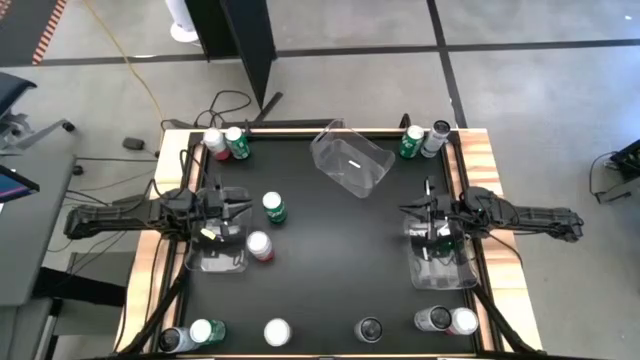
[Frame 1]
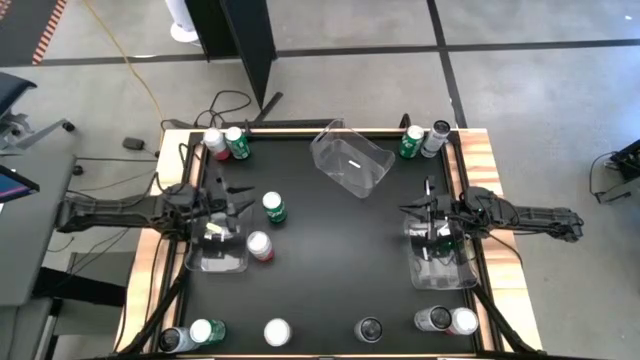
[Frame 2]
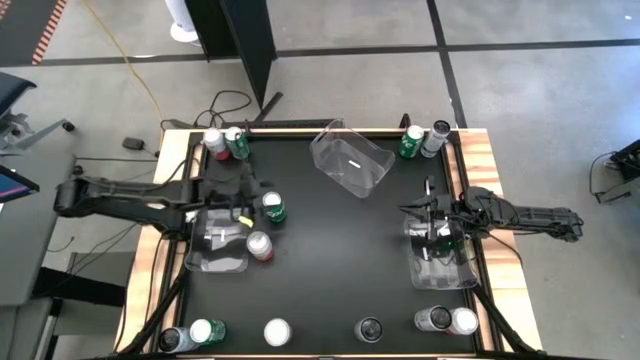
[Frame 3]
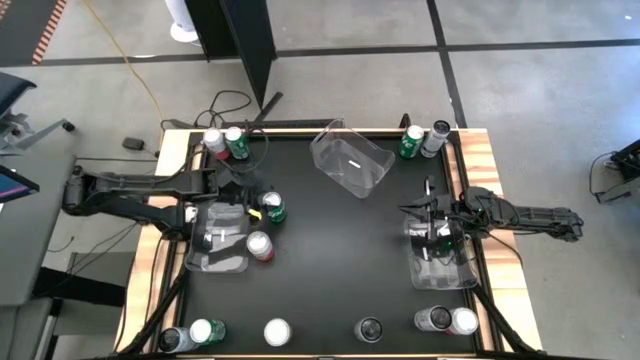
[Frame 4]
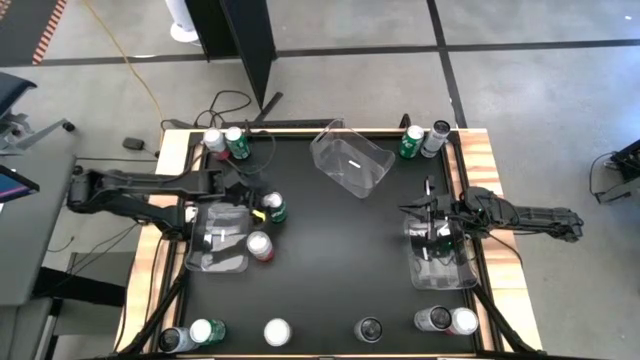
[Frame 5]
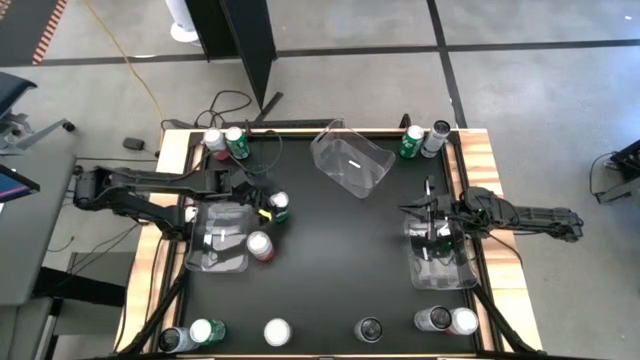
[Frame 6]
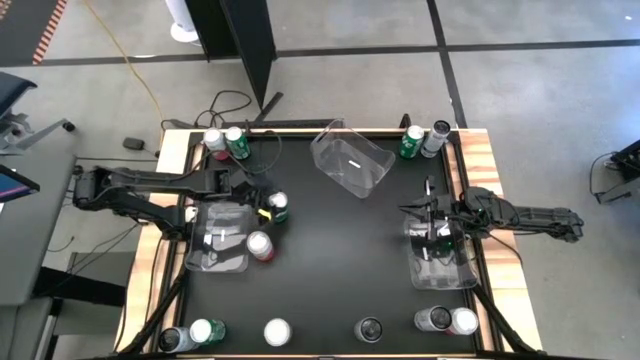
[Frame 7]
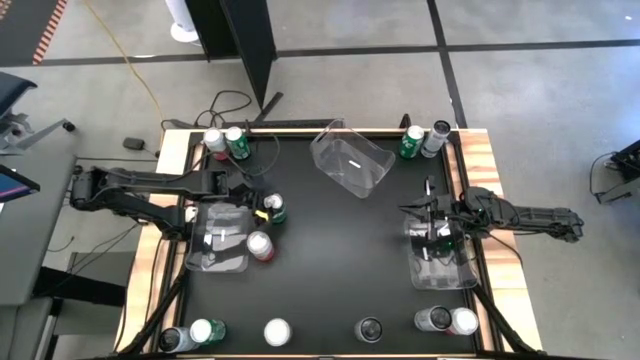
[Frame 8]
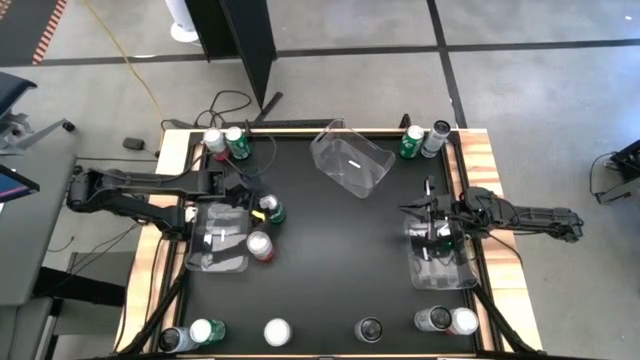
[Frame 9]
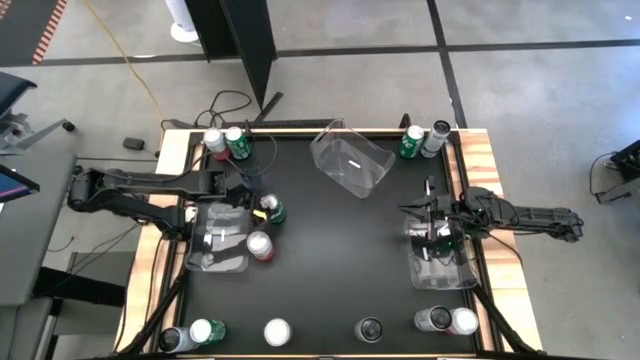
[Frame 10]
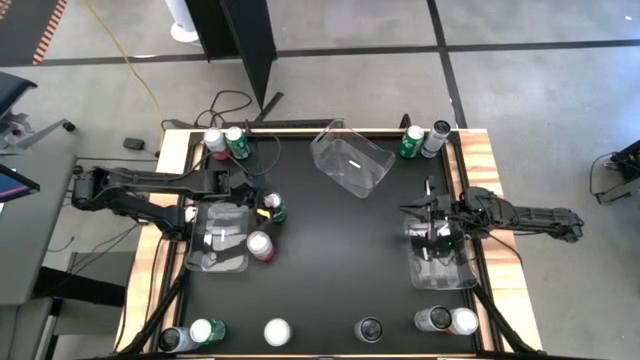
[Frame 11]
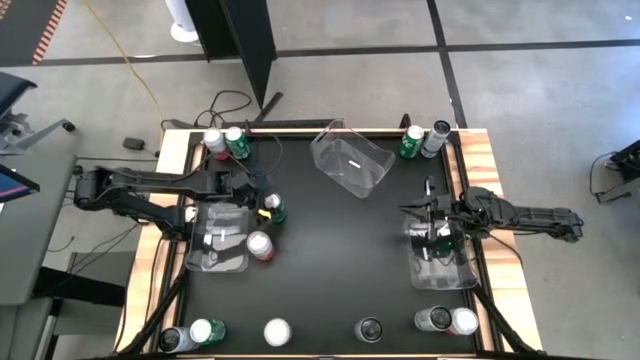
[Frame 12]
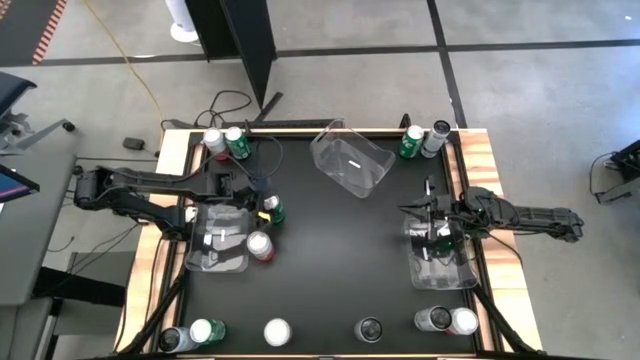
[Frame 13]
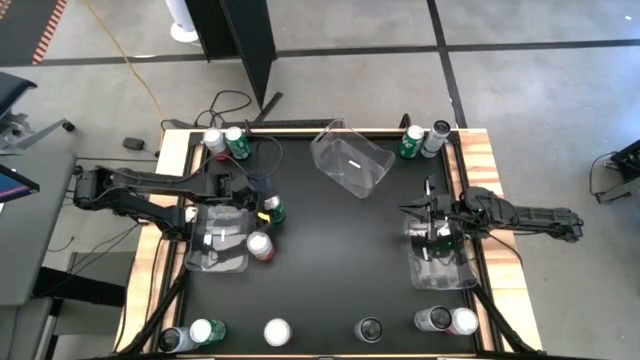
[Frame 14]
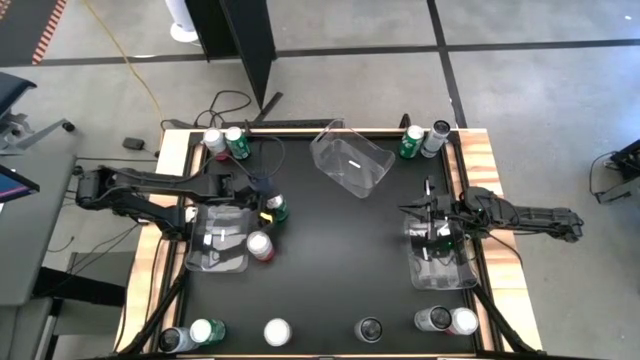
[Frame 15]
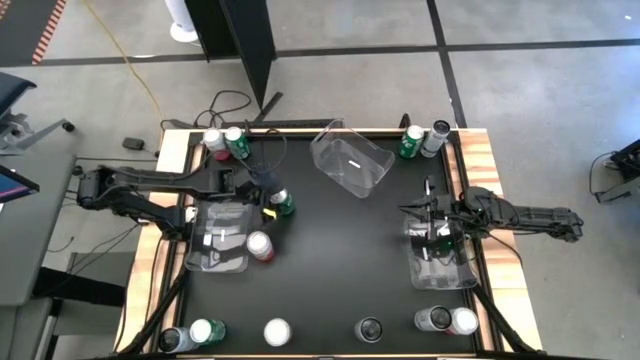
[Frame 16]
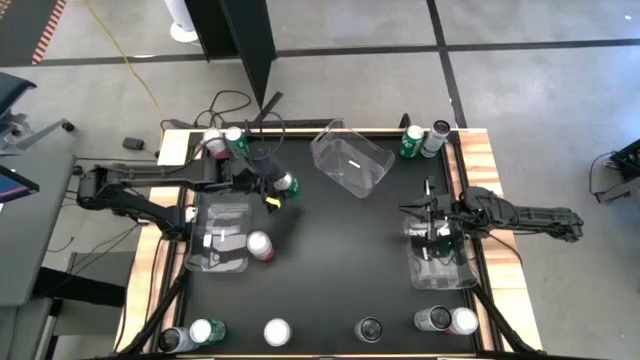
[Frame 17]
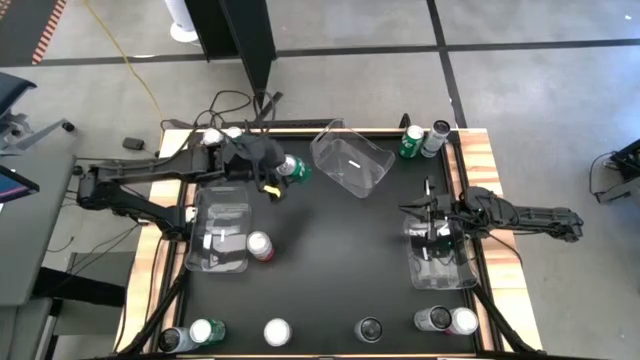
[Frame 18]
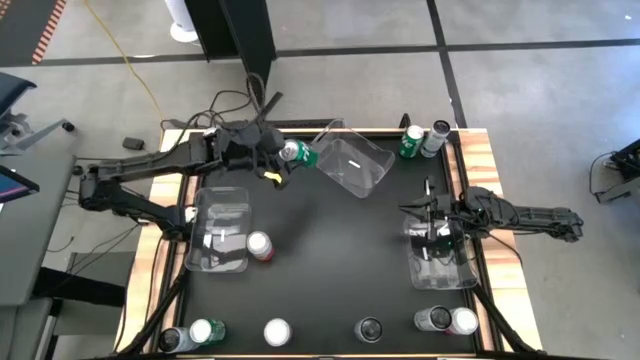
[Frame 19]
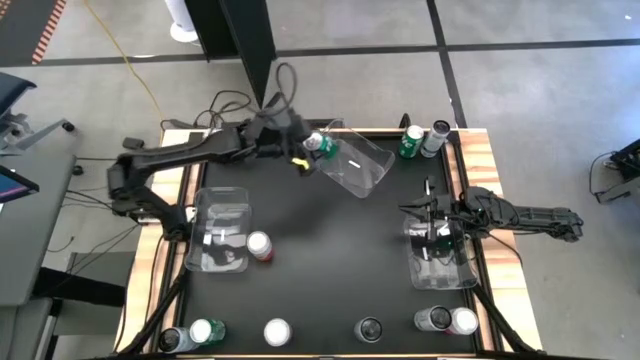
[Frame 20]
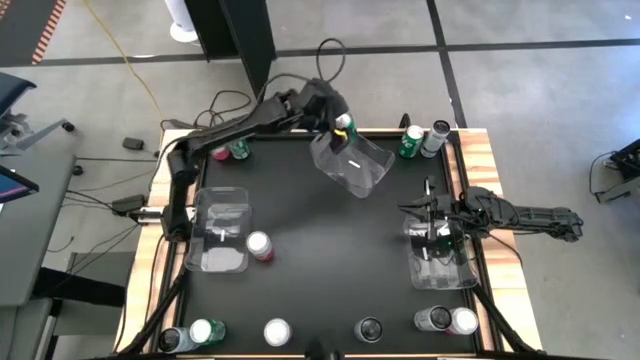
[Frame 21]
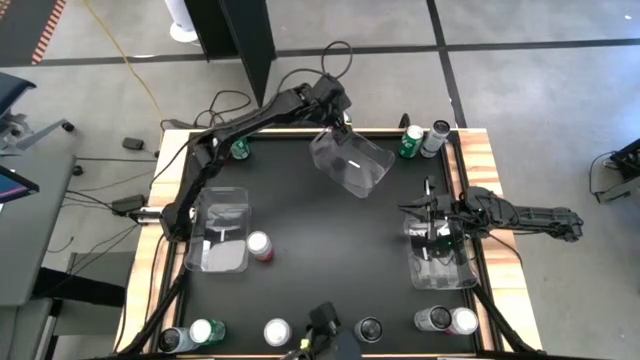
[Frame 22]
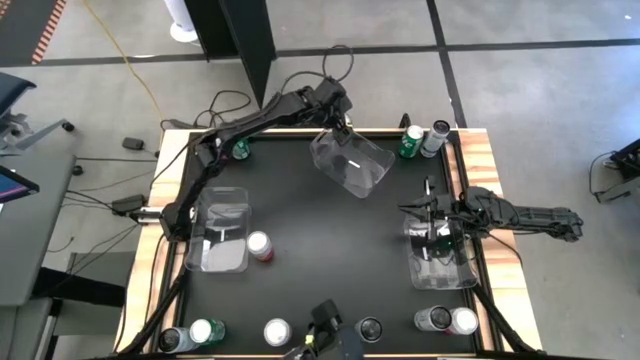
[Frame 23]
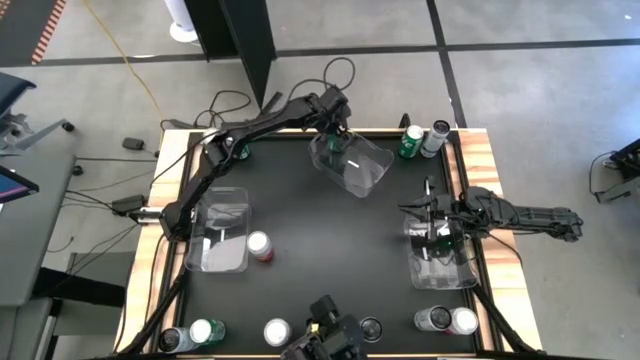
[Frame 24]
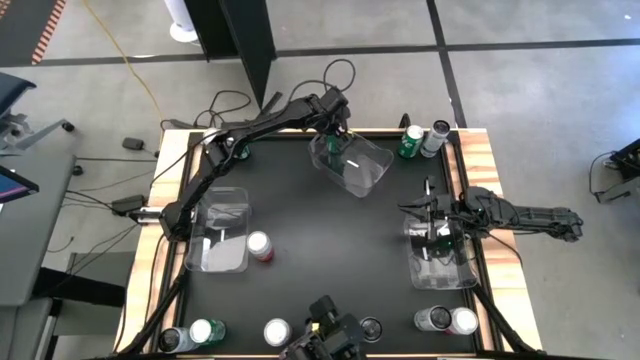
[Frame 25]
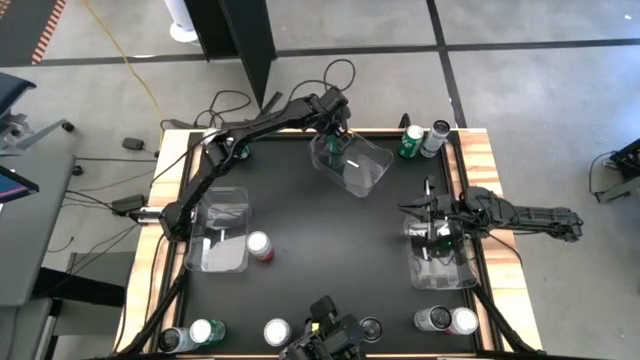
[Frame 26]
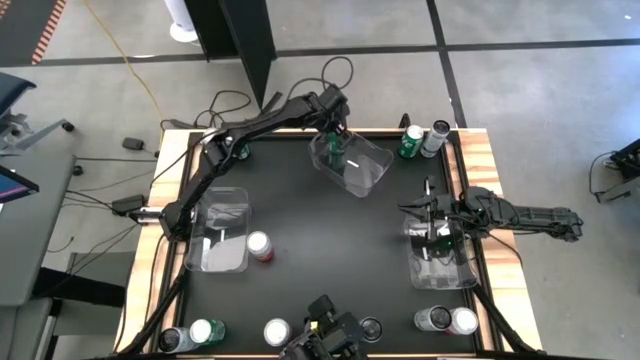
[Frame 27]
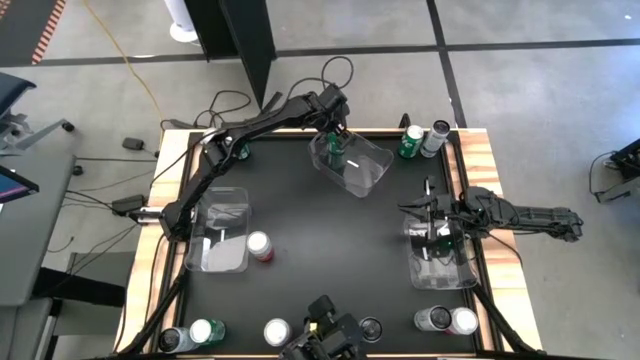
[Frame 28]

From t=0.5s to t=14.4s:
Task: Sort soda cans
Put the middle left green soda can into the middle transparent bin
